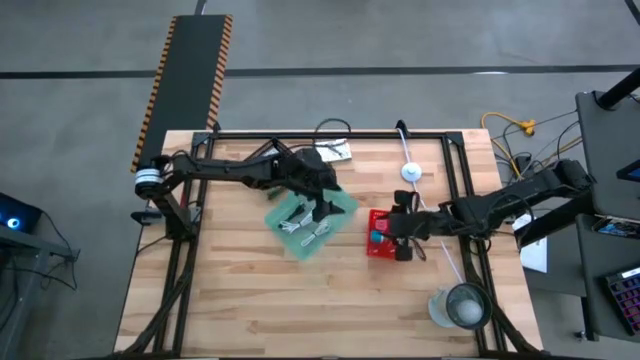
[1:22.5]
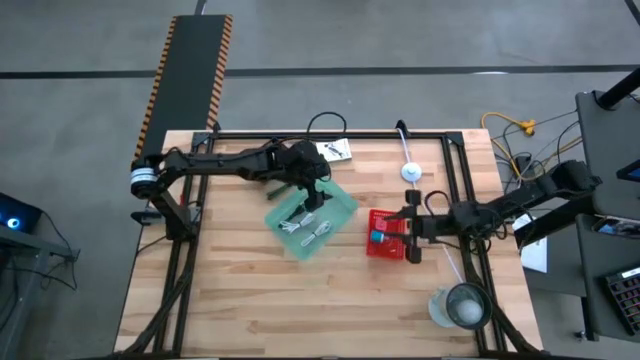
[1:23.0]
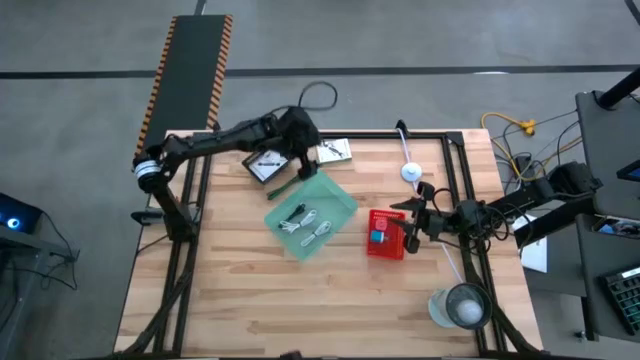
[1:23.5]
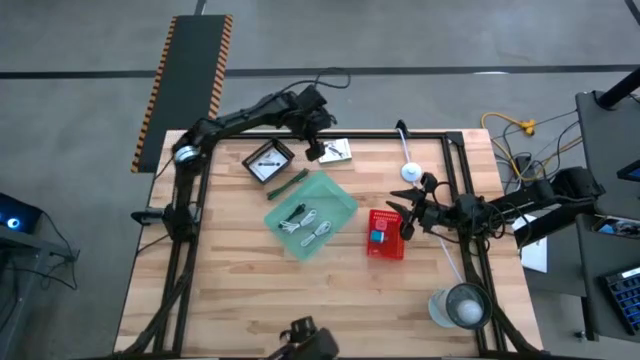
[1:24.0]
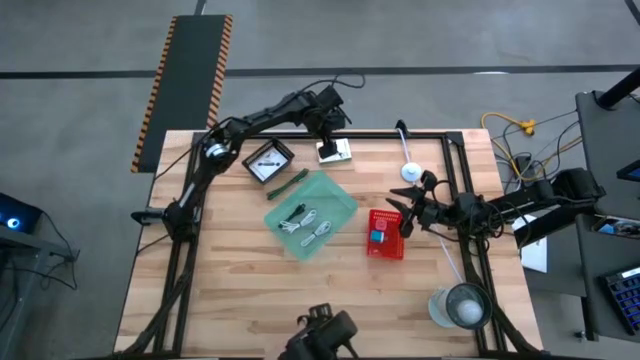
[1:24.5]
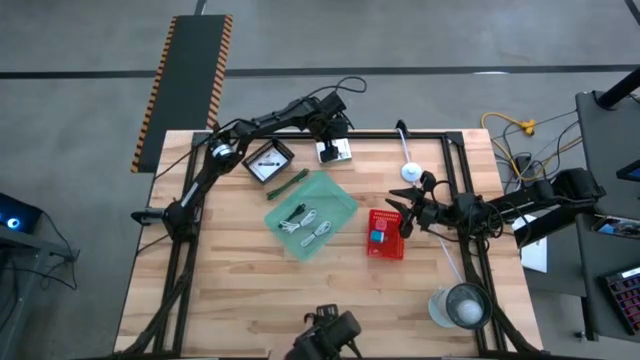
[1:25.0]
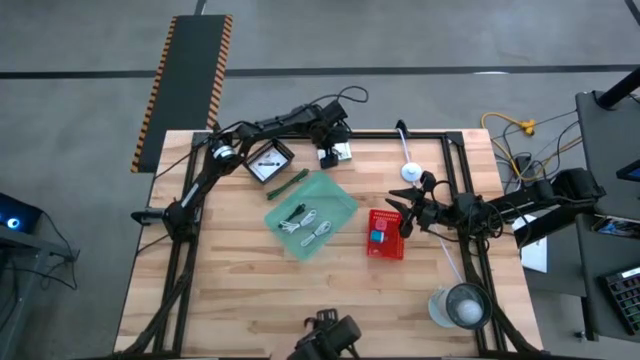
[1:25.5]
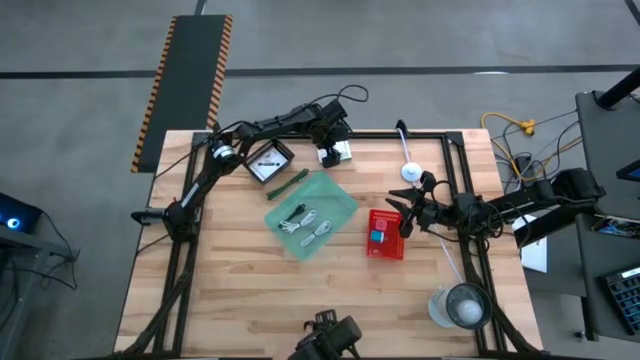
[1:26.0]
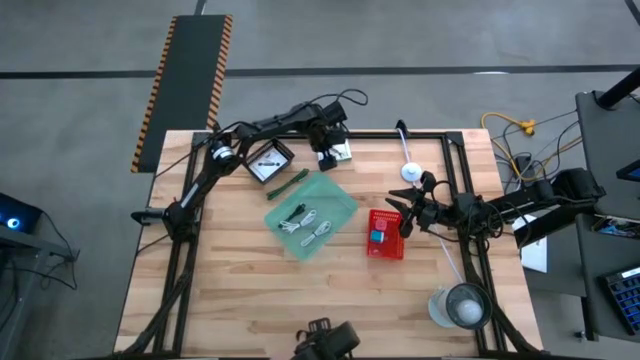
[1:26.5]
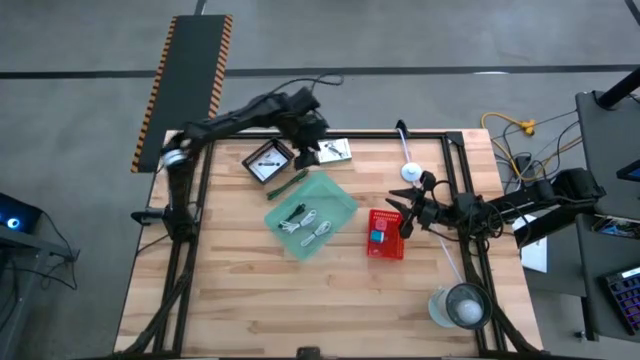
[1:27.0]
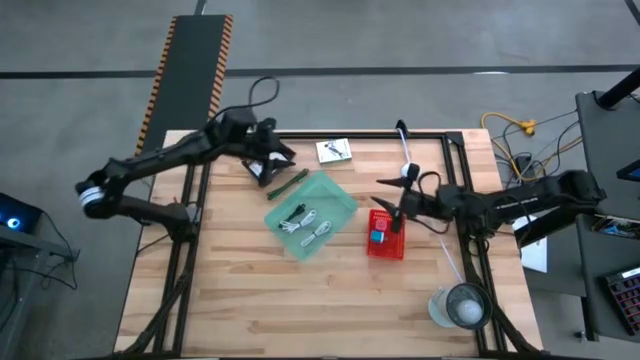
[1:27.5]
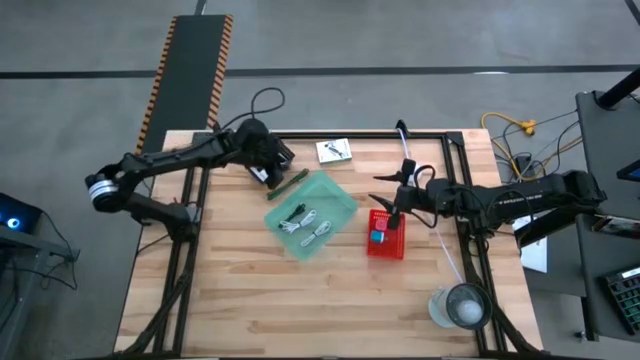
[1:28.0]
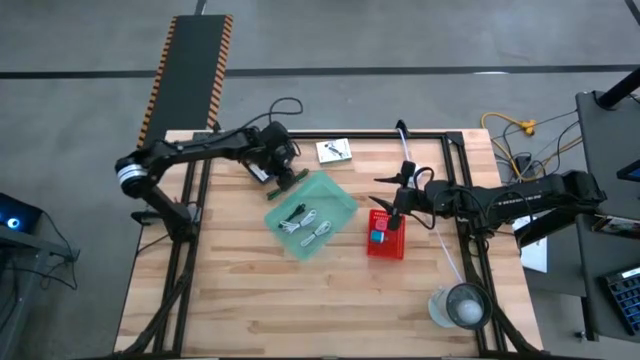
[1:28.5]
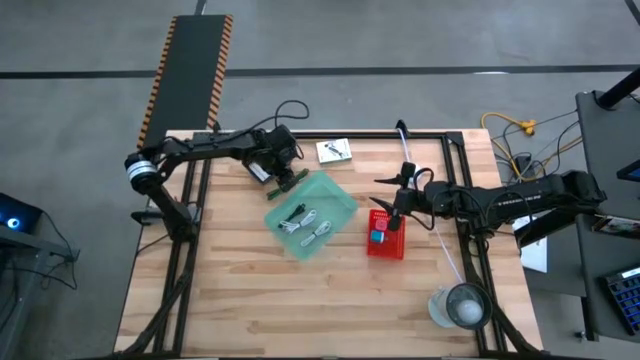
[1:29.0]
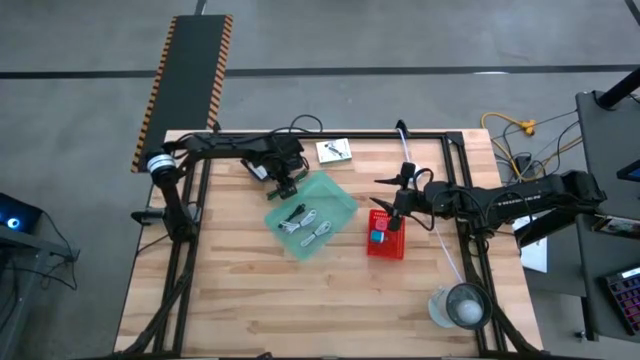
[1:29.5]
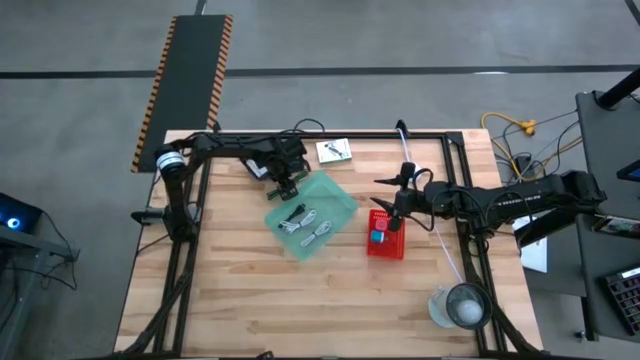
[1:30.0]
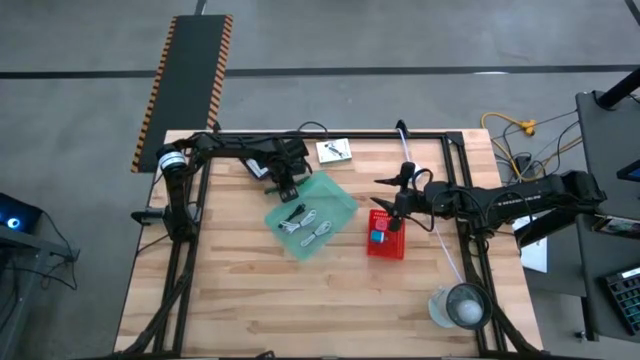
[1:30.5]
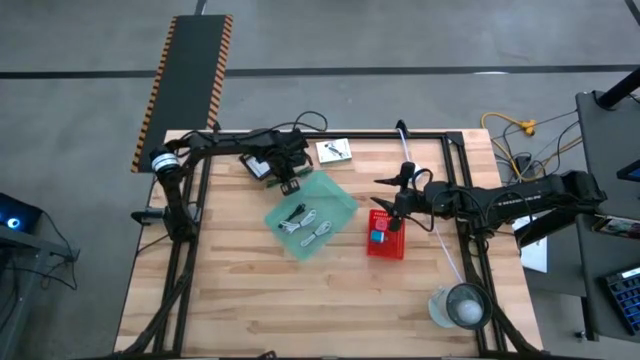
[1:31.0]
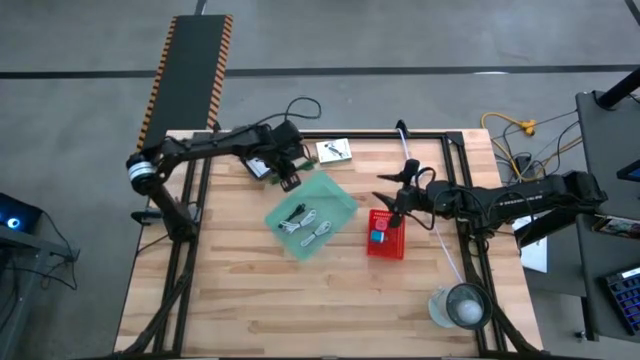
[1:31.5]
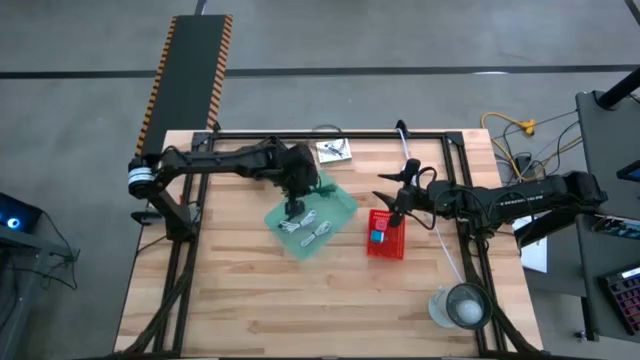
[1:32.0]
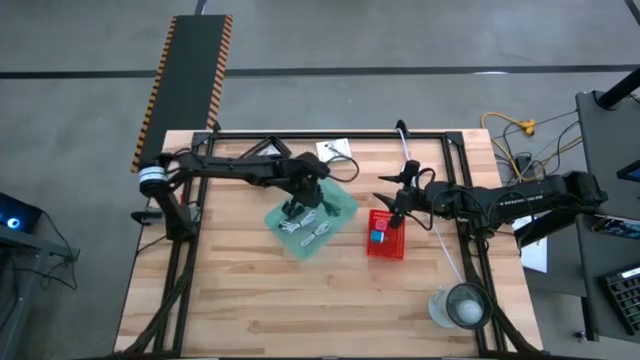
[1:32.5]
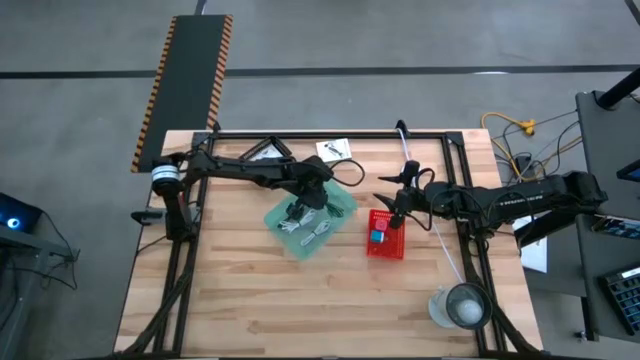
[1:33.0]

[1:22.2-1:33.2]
Task: Pick and place items into bin
Put the green charger cable into the green bin

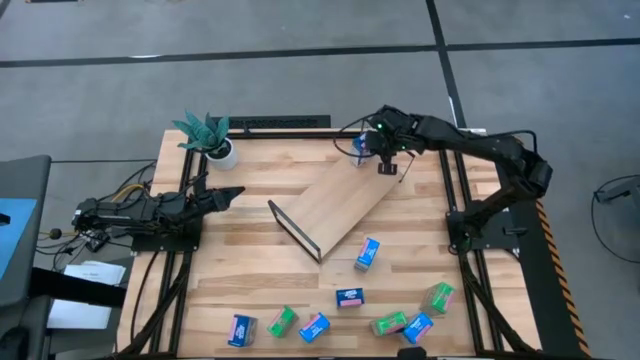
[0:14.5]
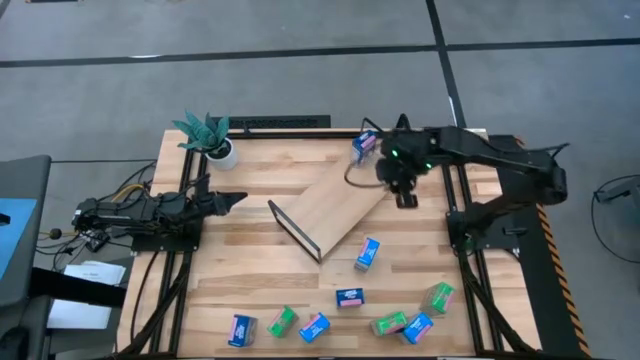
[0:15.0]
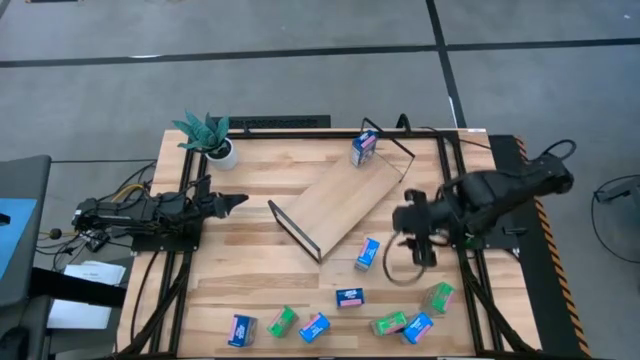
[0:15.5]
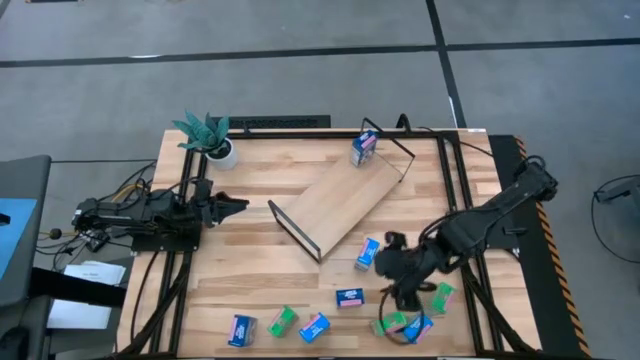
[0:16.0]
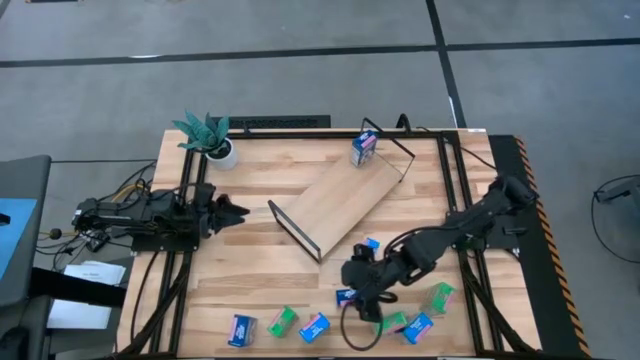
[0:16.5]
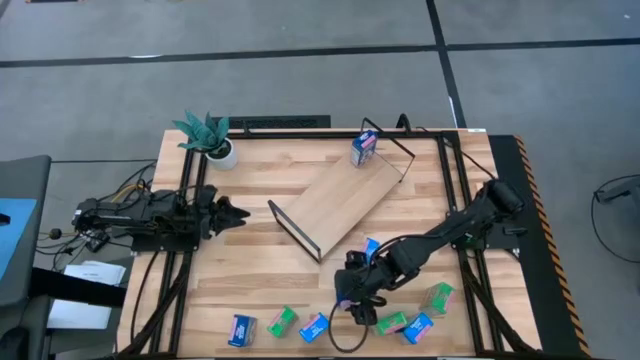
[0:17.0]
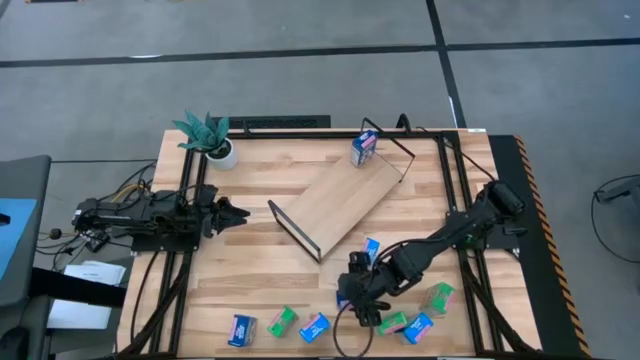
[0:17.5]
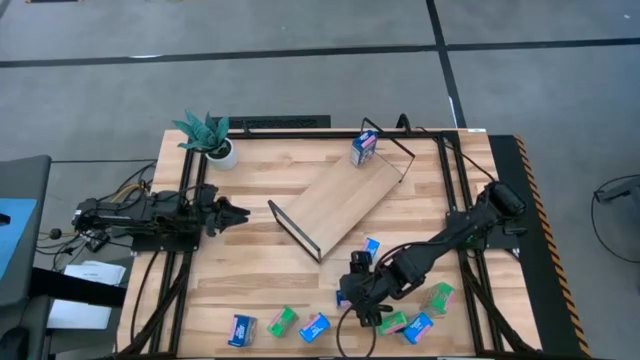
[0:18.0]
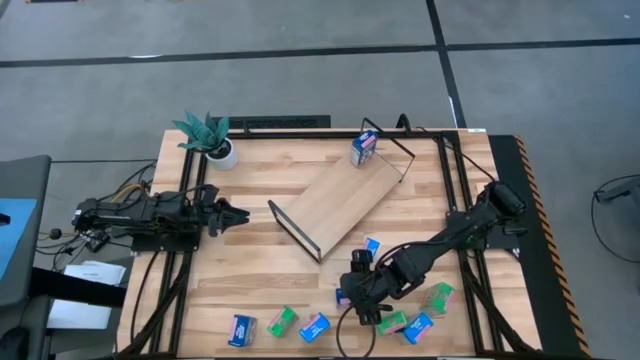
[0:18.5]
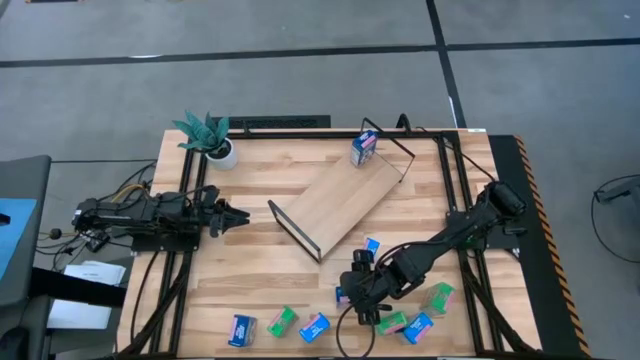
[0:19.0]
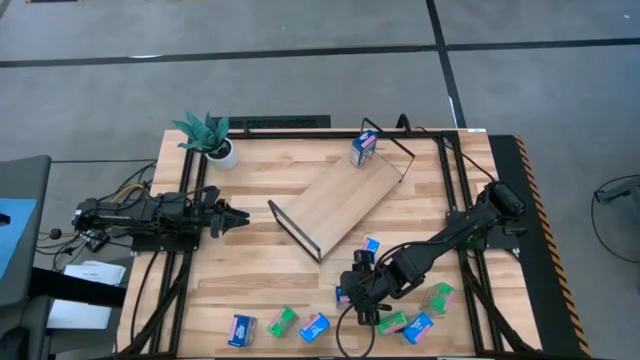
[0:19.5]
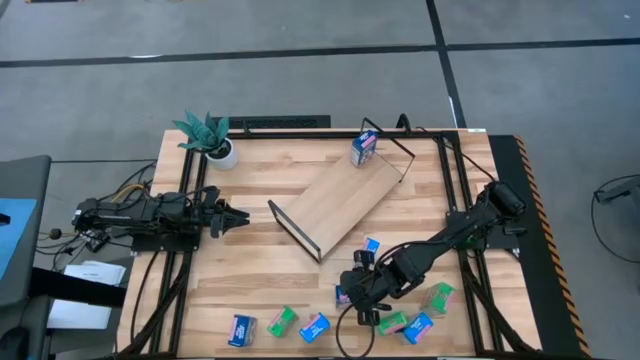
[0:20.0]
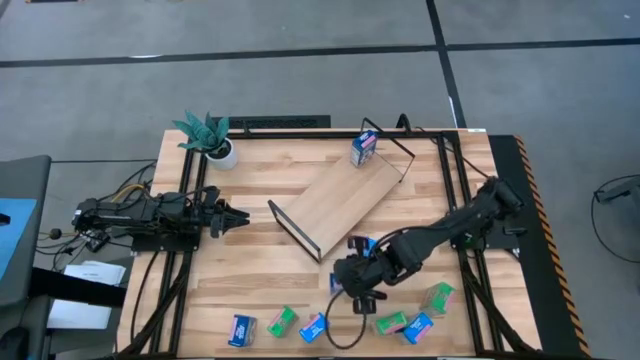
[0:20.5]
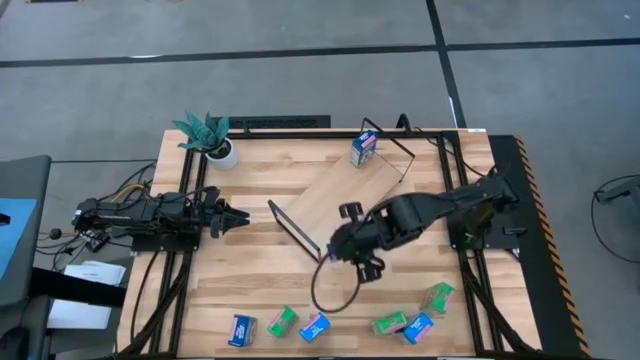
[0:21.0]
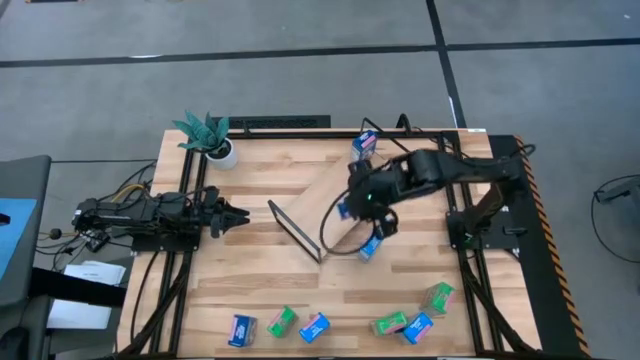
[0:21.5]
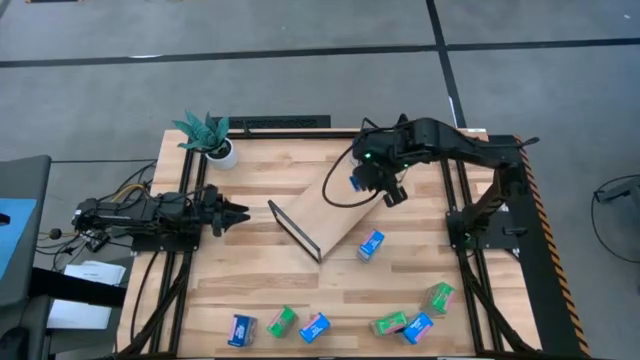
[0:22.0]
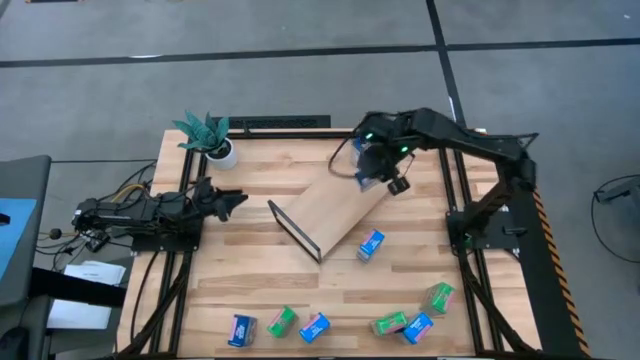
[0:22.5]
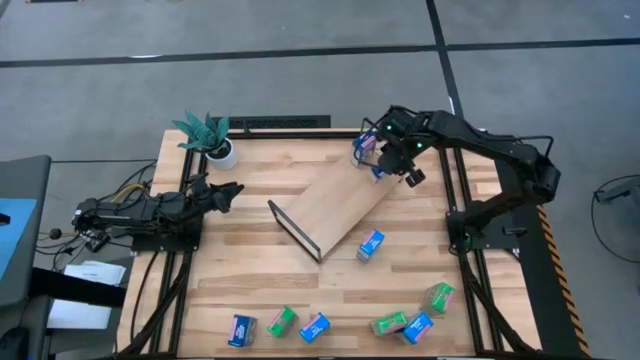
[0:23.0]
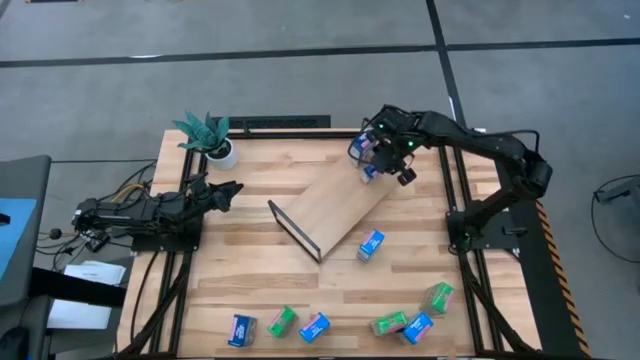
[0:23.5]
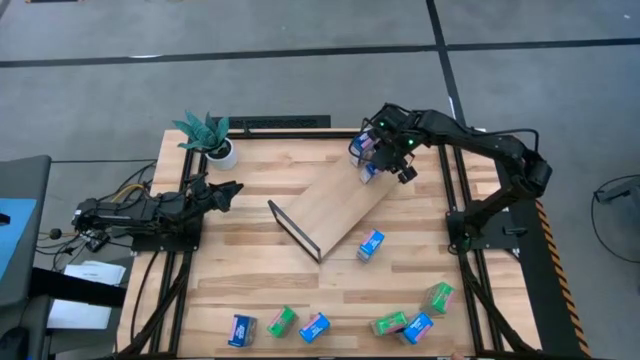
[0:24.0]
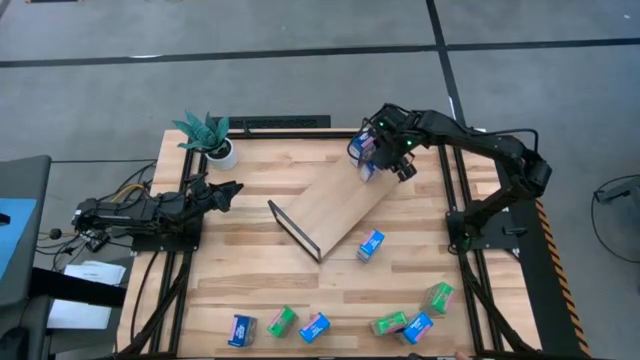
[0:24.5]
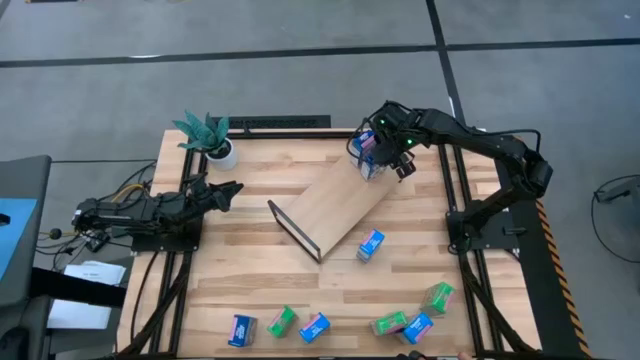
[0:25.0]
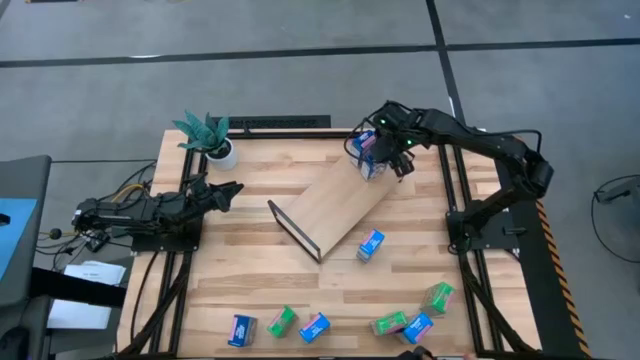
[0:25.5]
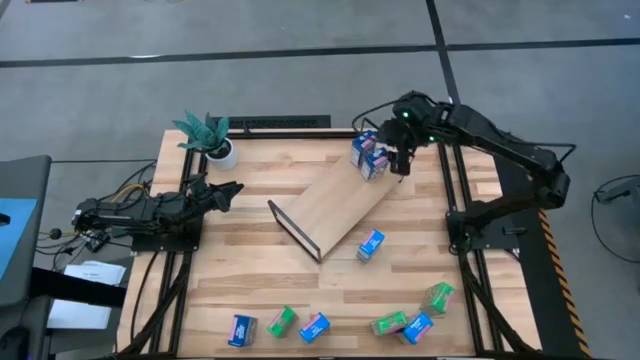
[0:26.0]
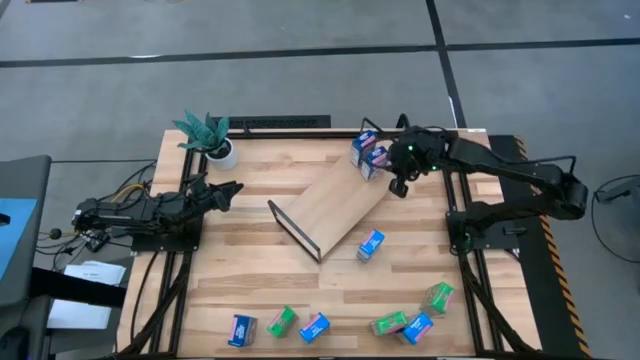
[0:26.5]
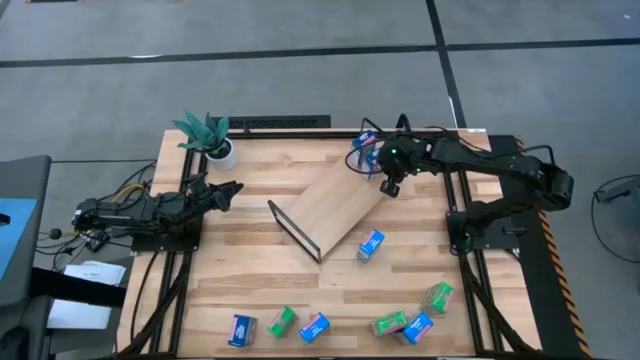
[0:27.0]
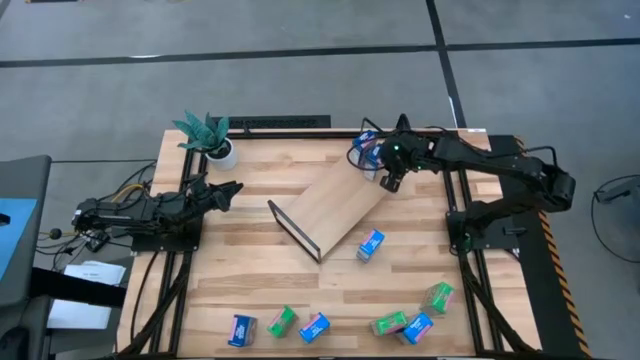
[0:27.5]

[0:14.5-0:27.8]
Task: Stack cereal on shelf
Put the right blue cereal box on the shelf aligned with the blue cereal box
